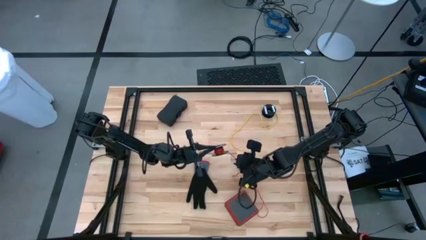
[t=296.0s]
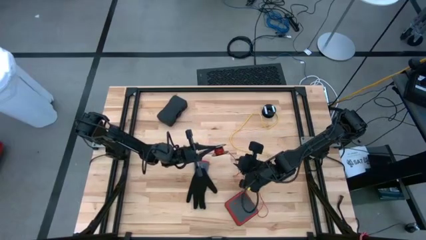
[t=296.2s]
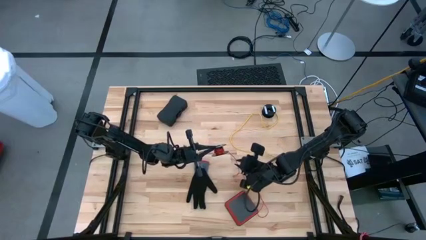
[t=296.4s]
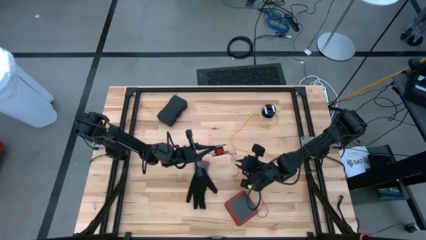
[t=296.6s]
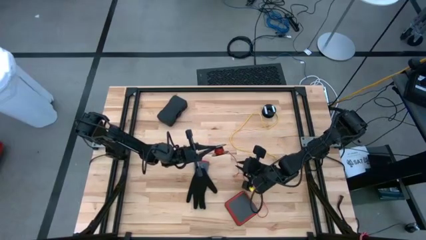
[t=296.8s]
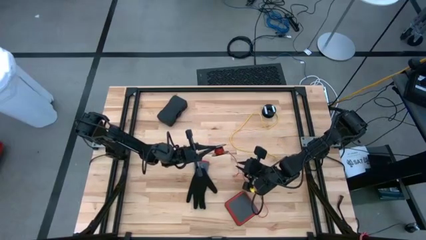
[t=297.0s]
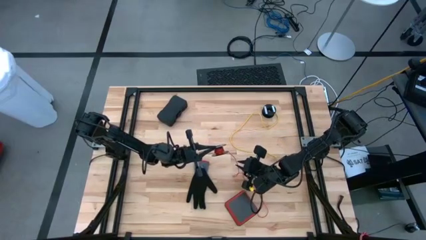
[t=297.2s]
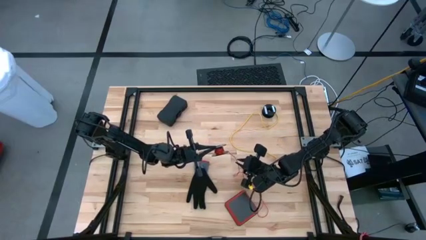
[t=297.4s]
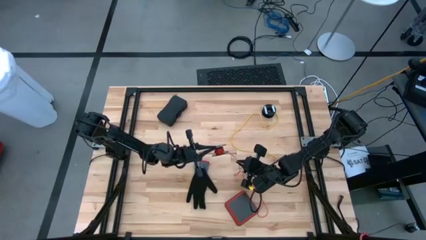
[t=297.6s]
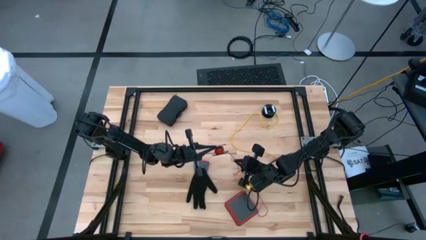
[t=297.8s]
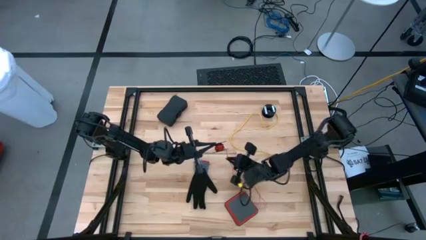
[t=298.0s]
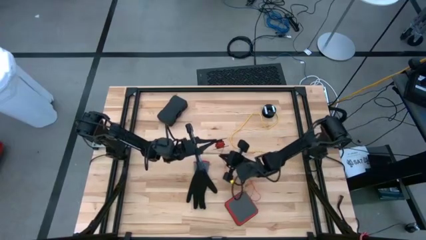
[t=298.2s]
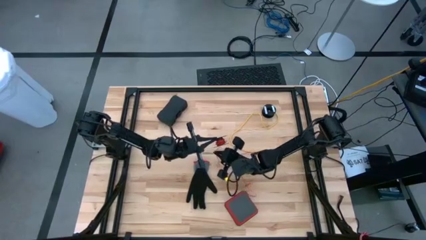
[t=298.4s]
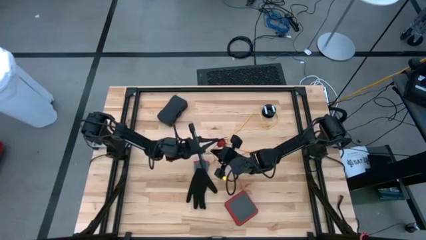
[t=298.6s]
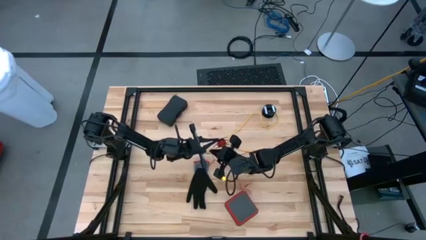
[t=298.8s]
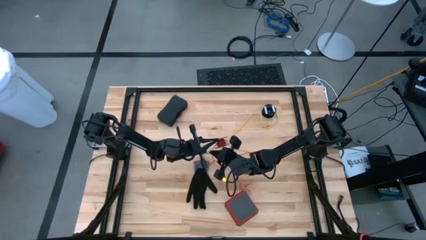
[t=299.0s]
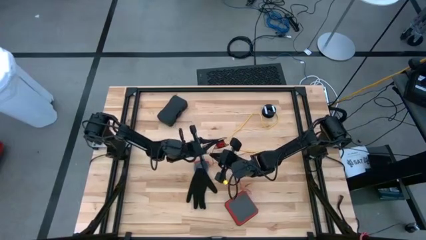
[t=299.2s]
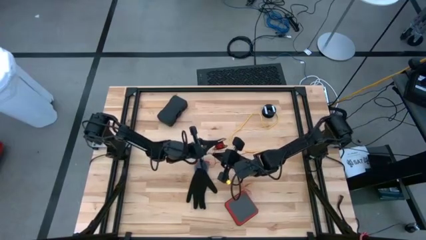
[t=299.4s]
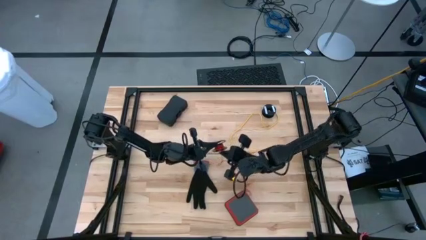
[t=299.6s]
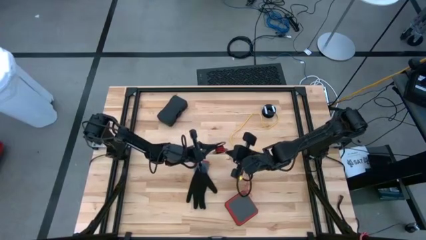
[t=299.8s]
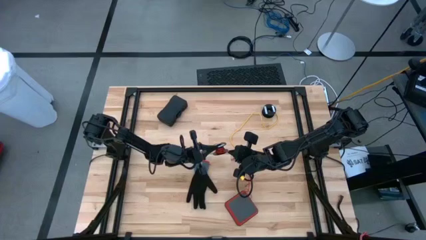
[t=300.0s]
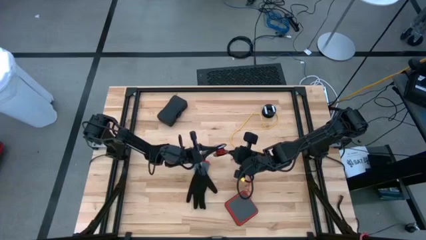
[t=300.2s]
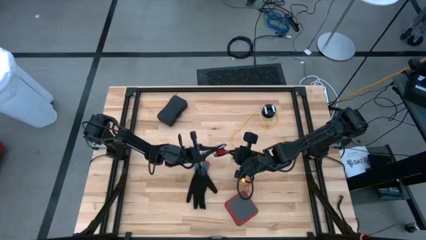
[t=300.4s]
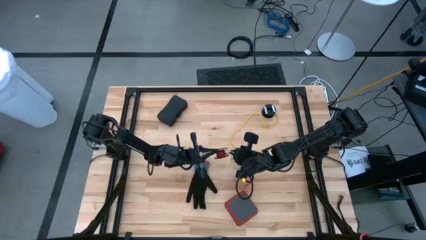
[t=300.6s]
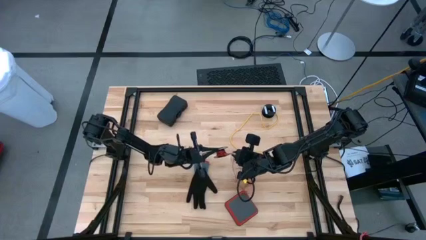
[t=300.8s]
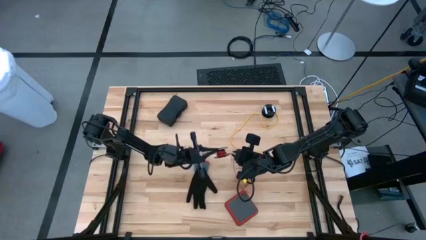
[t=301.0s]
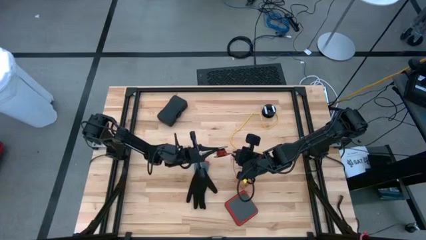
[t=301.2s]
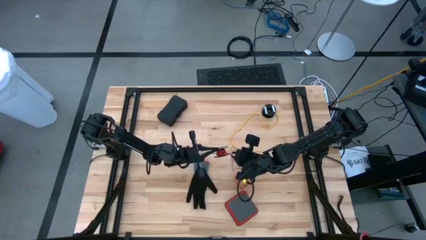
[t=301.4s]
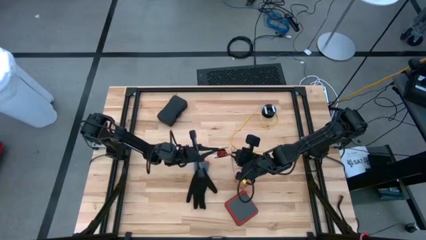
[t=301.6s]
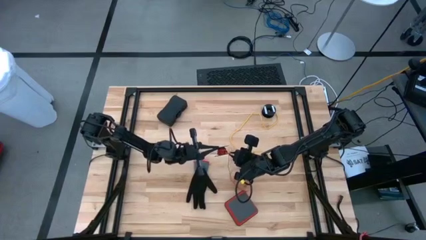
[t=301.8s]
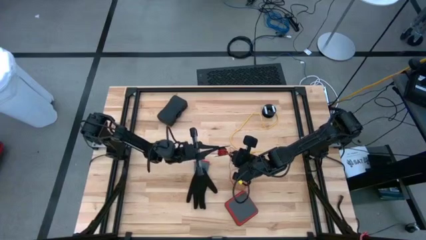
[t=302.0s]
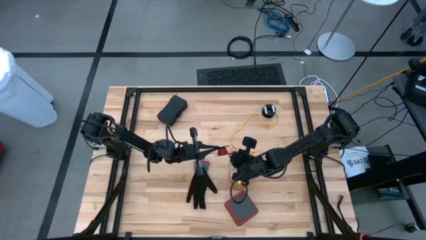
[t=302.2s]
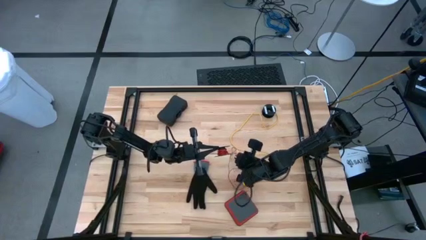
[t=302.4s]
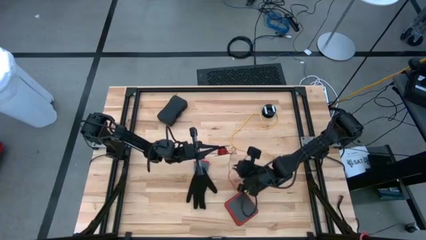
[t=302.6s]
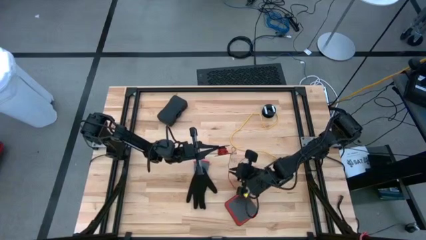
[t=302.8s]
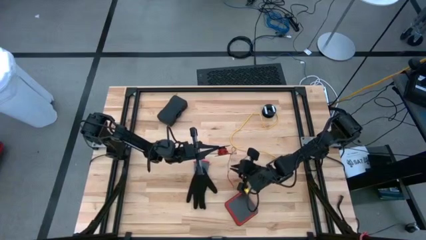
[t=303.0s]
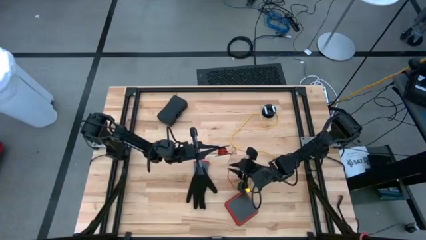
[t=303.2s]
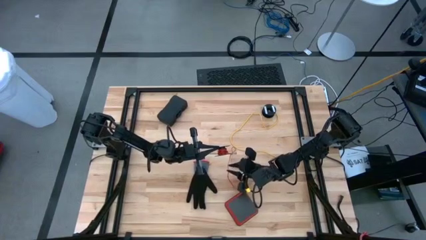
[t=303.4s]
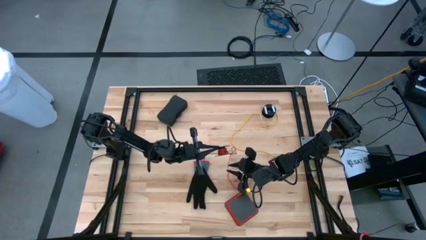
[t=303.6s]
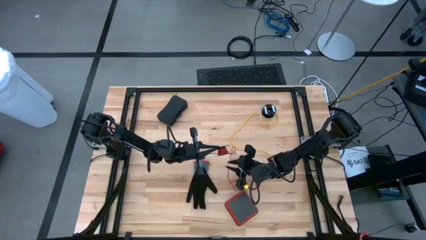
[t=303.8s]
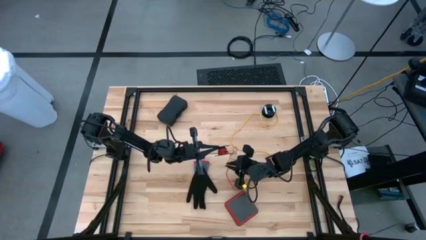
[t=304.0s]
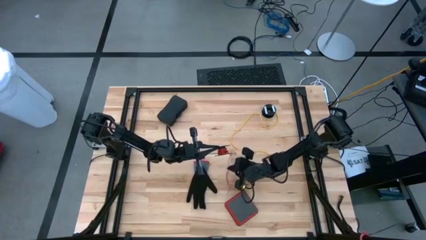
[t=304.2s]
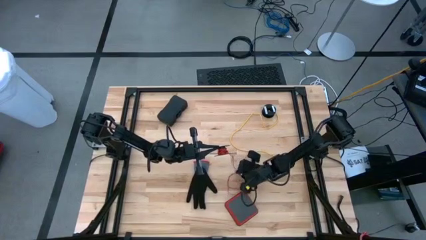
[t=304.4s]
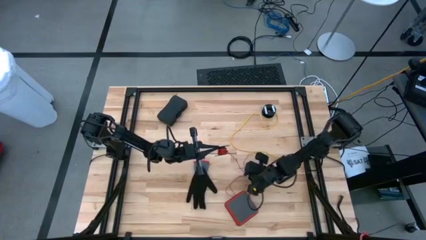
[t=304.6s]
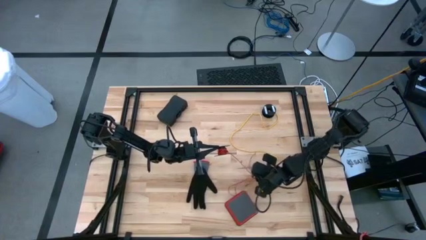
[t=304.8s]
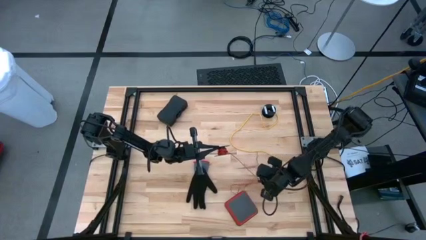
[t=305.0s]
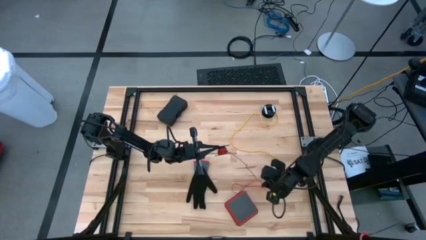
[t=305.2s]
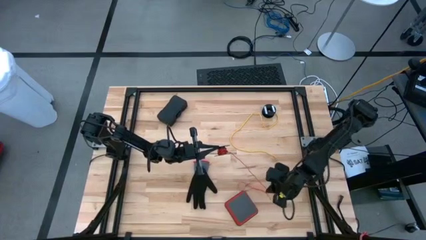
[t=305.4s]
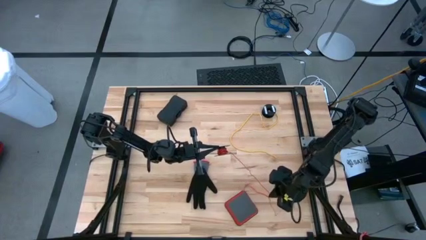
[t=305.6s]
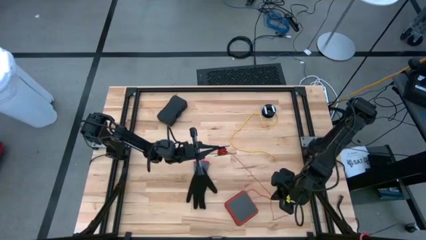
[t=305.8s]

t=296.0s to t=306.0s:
Task: Coil cords
Coil the red wire onto the black spool

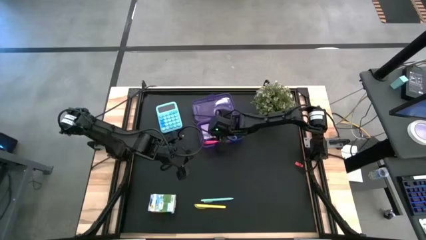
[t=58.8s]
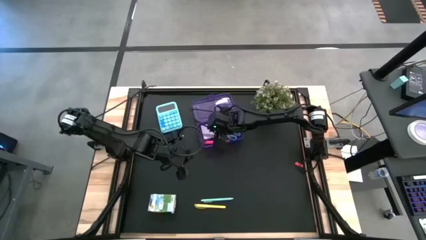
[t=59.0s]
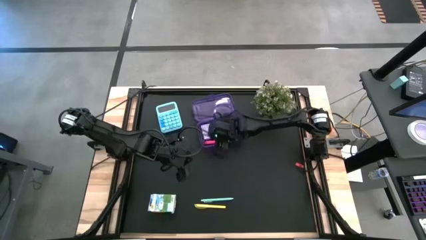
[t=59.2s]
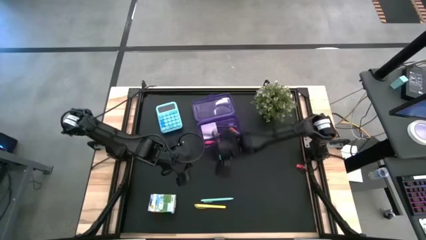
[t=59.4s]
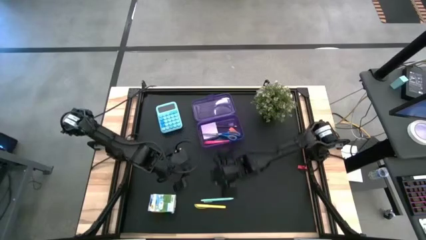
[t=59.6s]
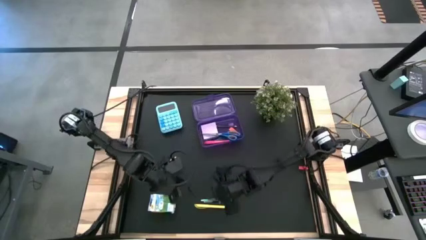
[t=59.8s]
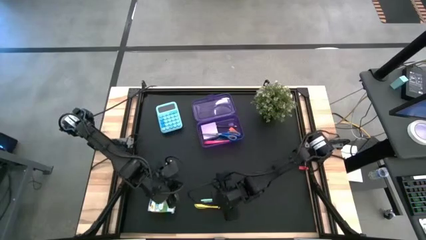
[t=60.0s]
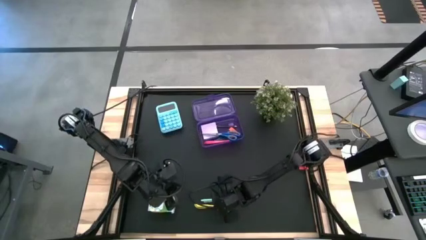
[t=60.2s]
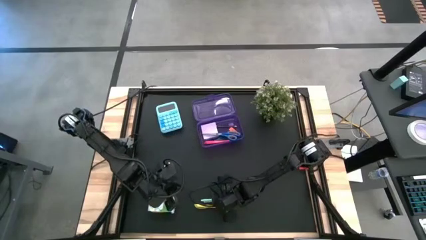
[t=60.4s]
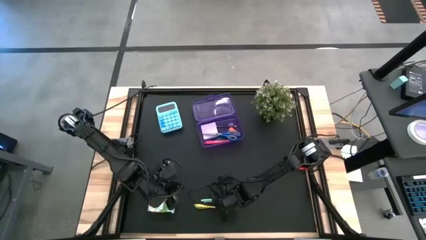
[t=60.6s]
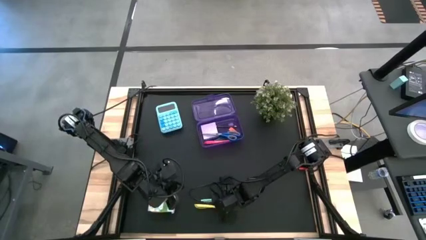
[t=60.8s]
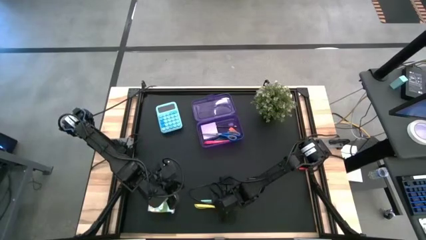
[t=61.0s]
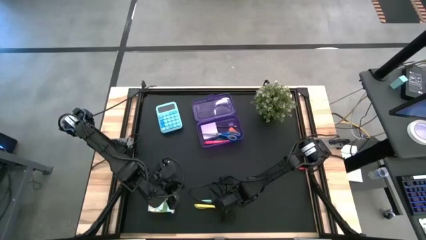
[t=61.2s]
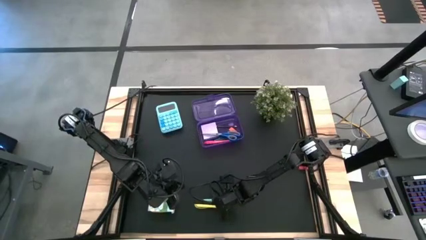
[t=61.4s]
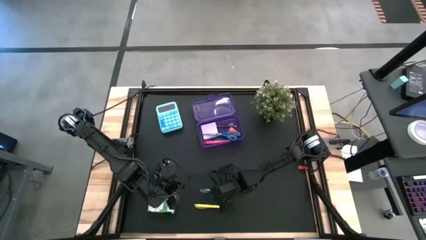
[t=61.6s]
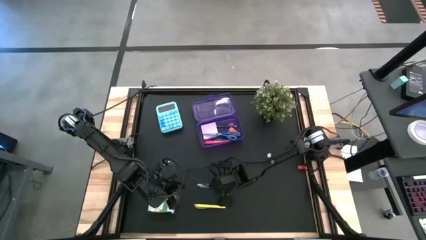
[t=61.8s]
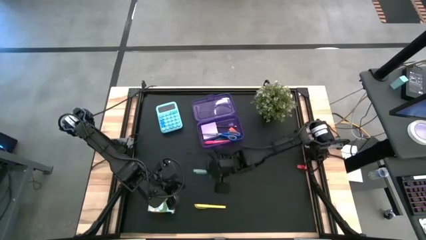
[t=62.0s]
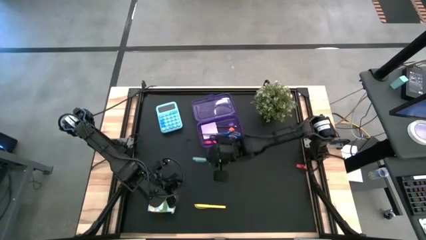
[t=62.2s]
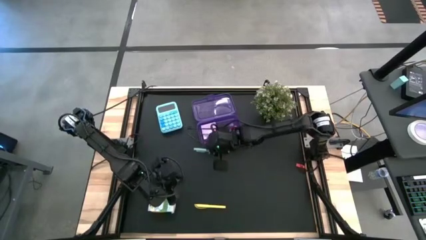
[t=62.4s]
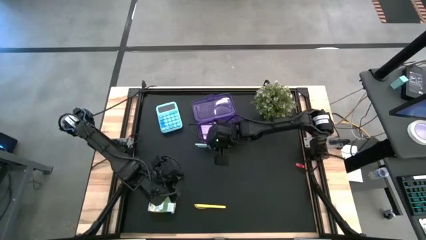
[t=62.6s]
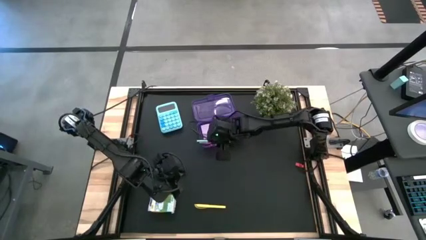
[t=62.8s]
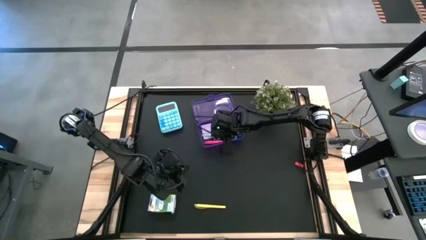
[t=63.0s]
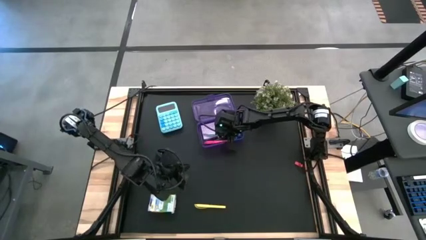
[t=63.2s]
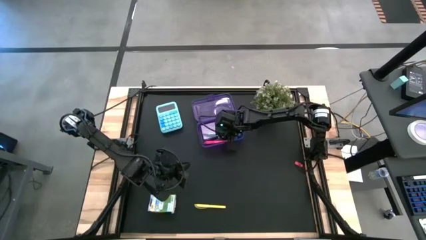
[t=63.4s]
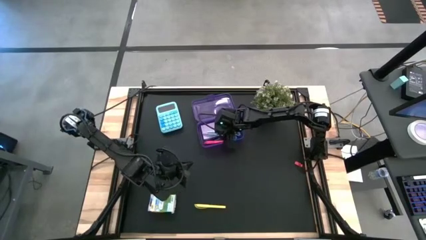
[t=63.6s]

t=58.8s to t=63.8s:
Task: Pack school essentials
Put the light blue pen into the purple supply box
